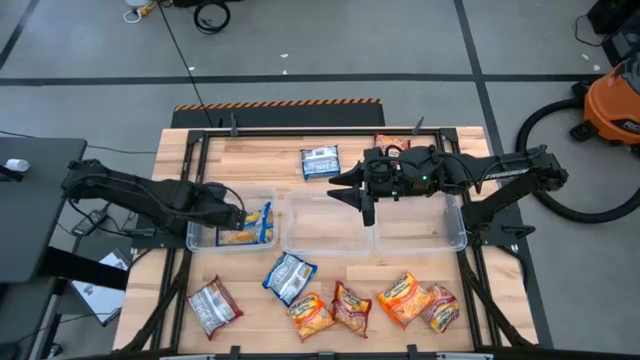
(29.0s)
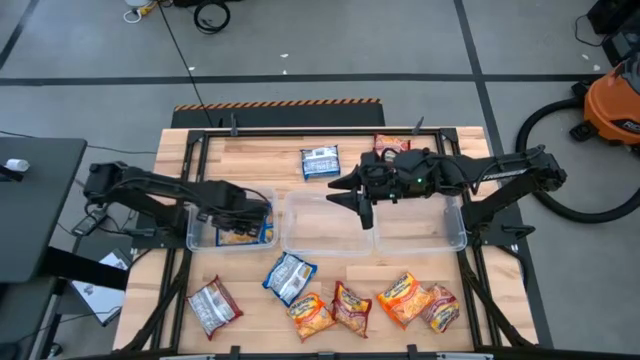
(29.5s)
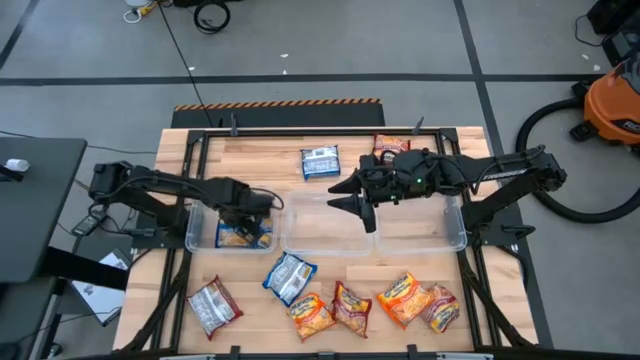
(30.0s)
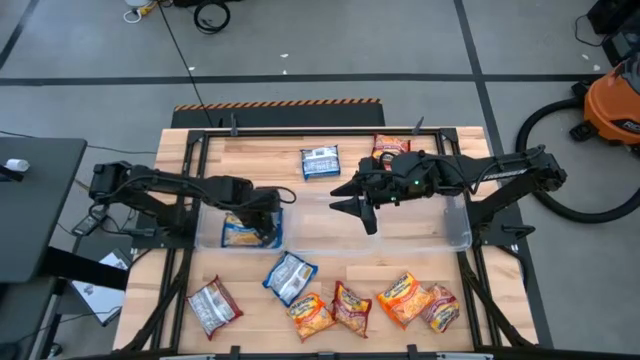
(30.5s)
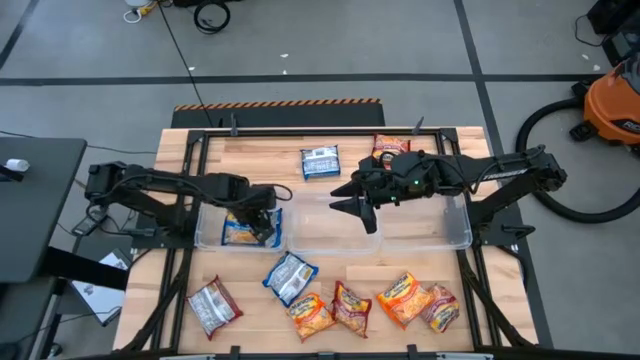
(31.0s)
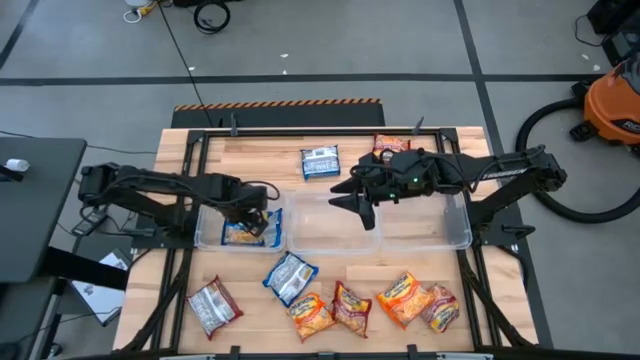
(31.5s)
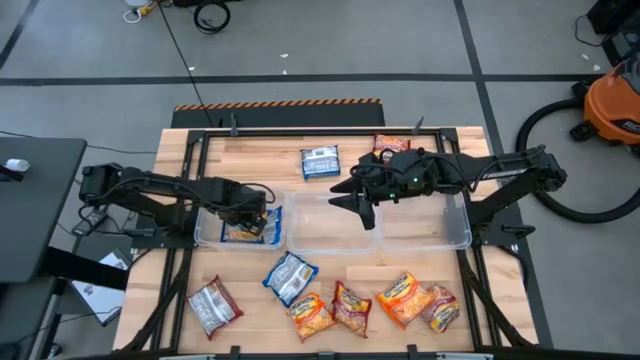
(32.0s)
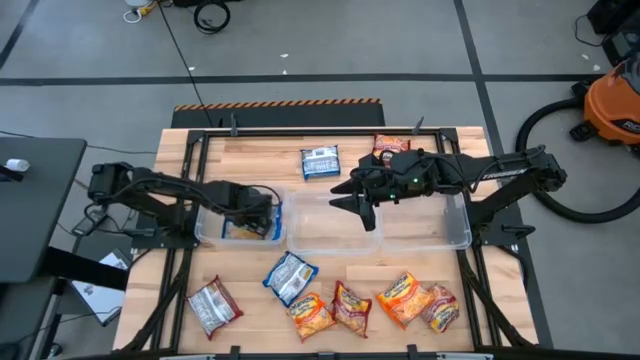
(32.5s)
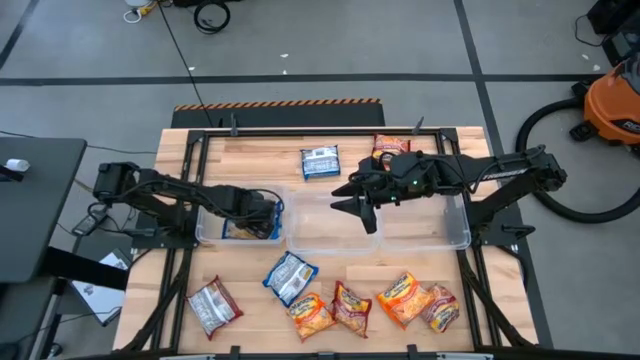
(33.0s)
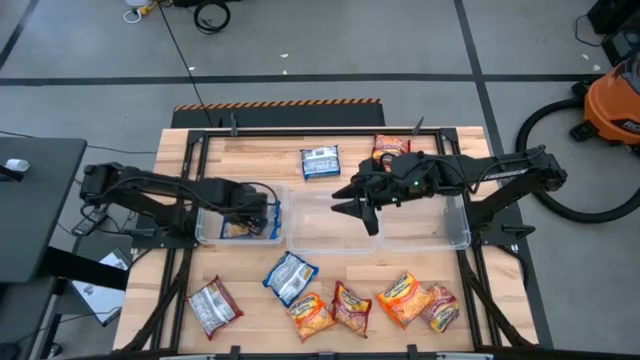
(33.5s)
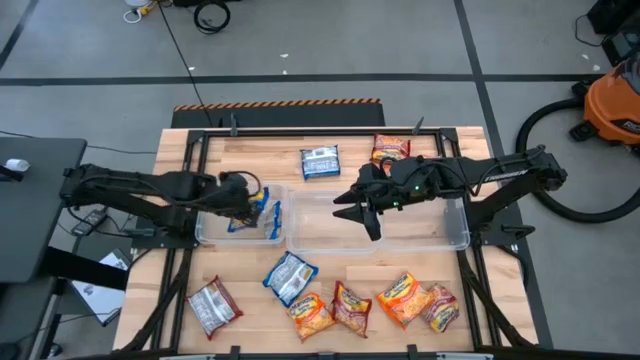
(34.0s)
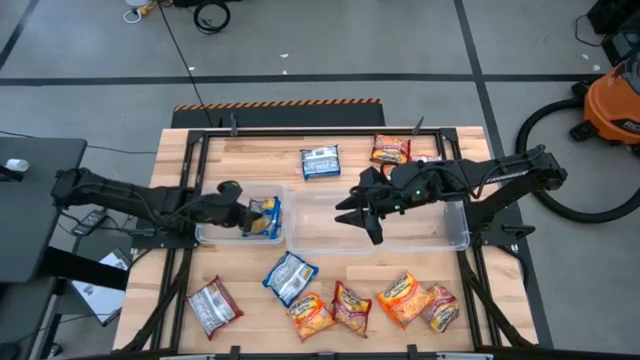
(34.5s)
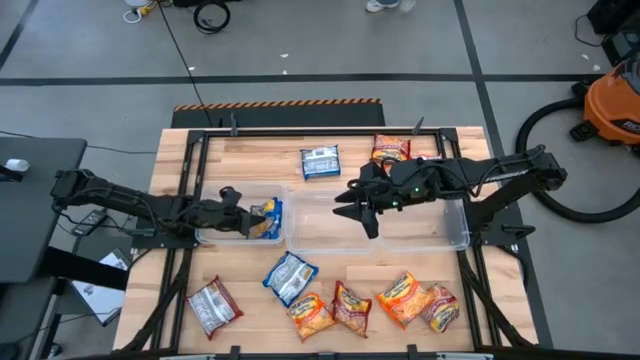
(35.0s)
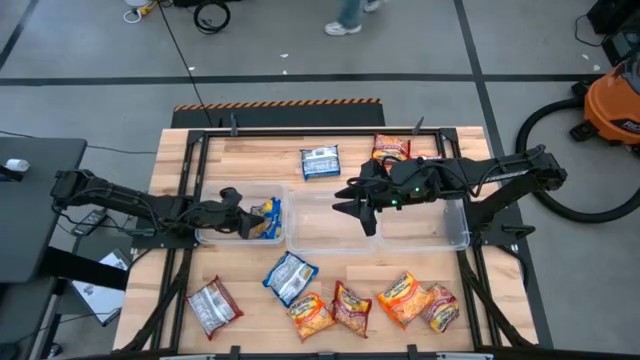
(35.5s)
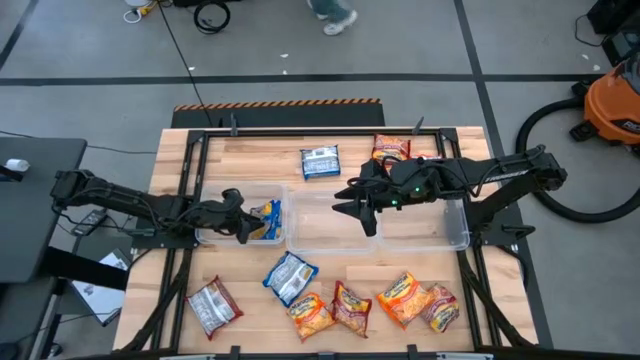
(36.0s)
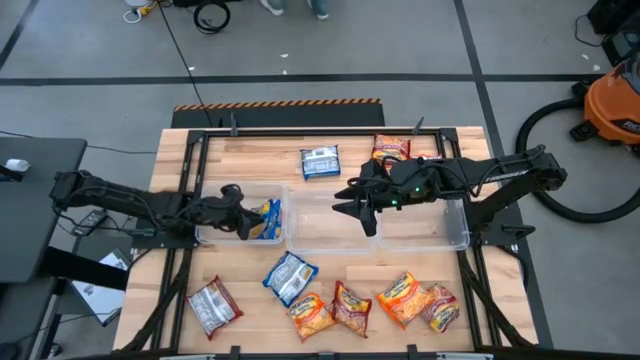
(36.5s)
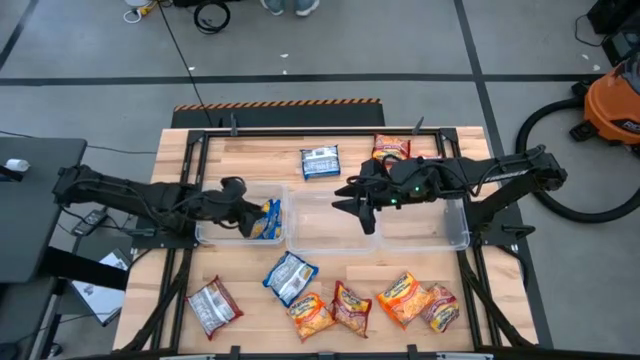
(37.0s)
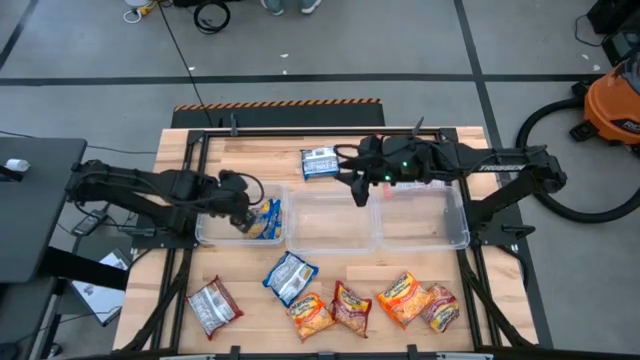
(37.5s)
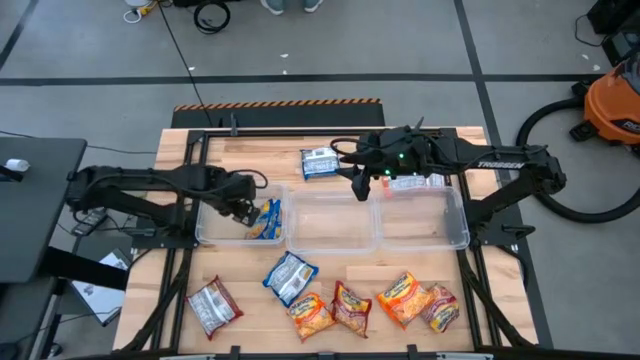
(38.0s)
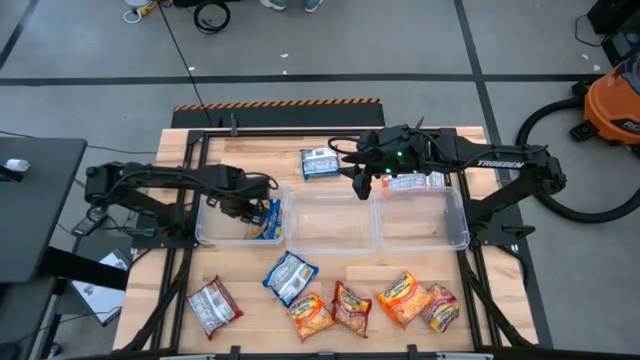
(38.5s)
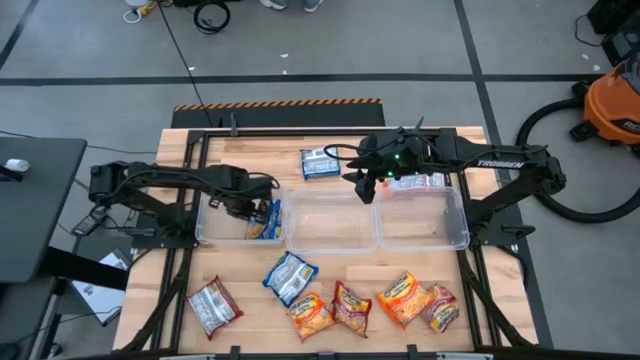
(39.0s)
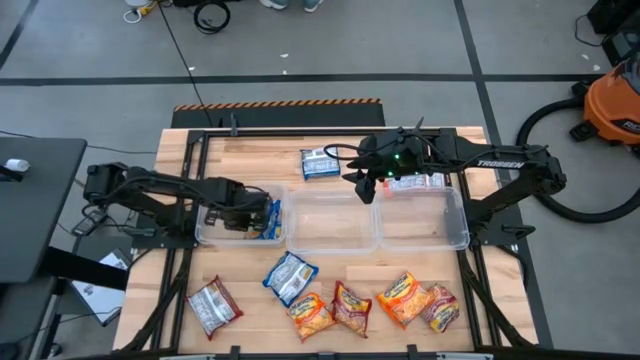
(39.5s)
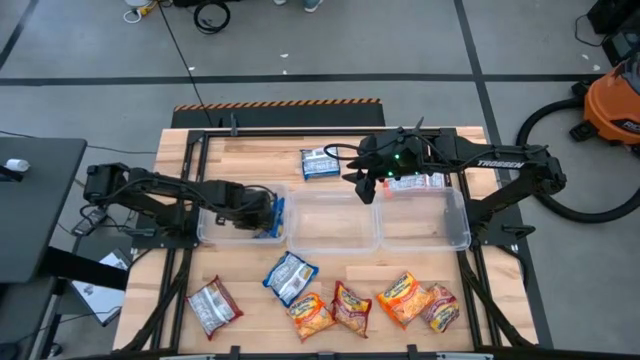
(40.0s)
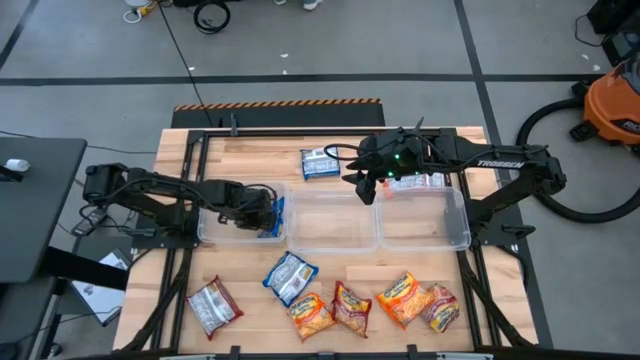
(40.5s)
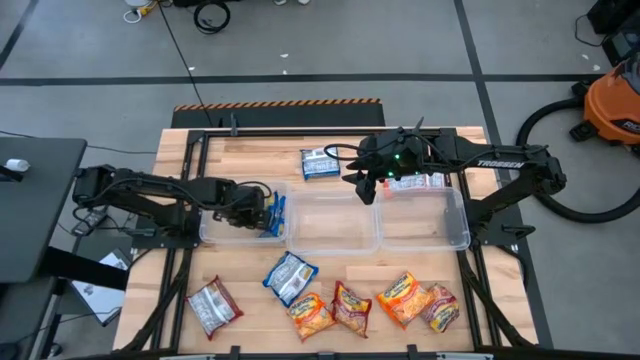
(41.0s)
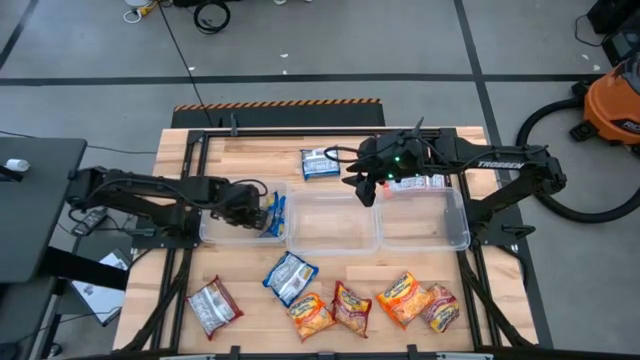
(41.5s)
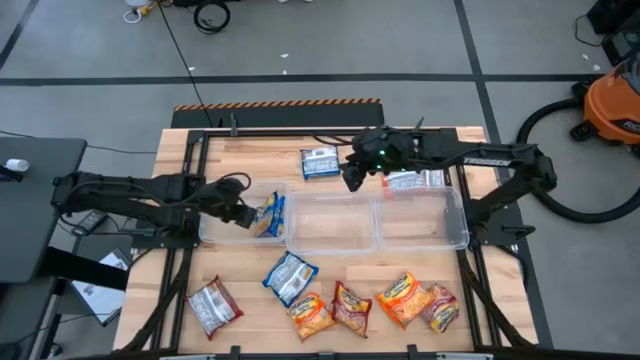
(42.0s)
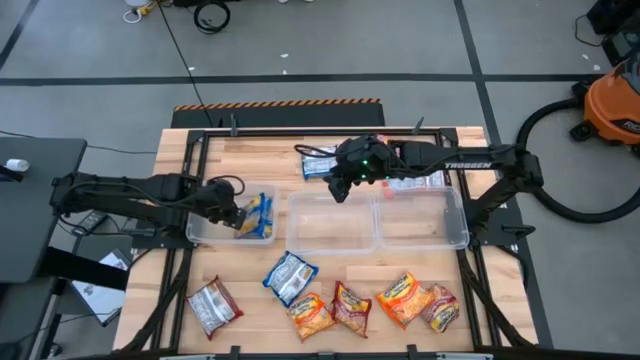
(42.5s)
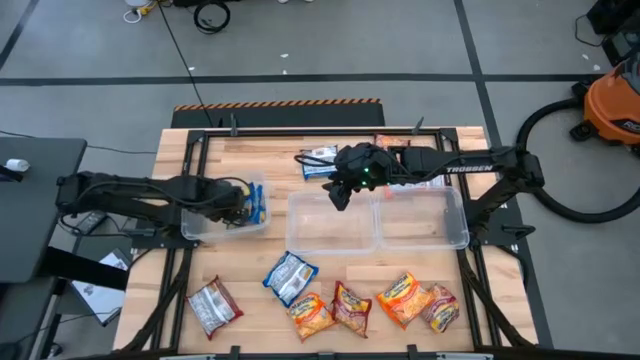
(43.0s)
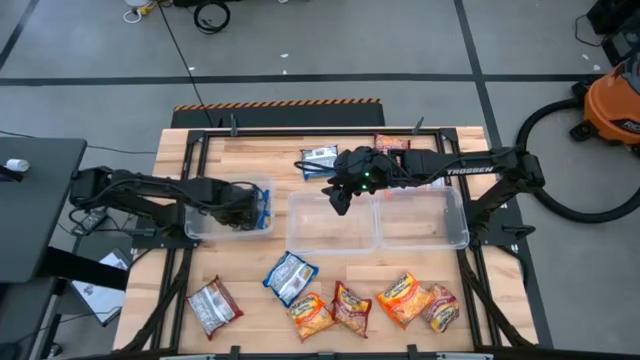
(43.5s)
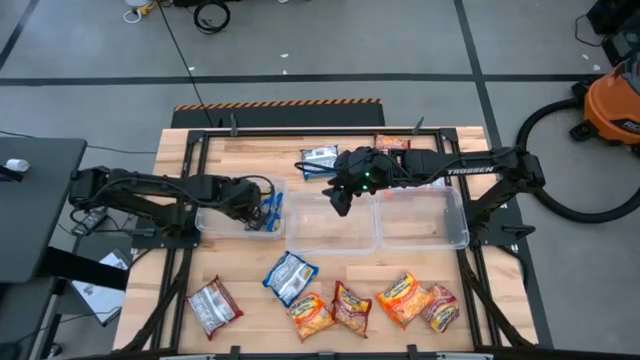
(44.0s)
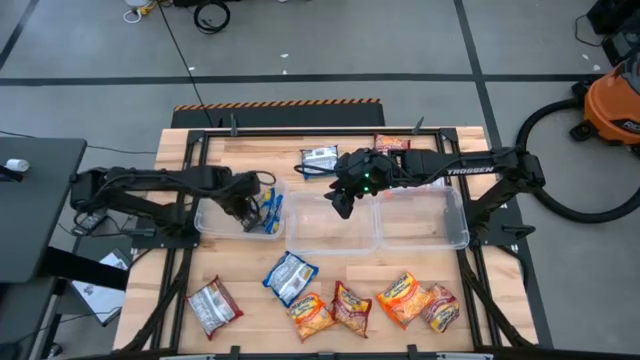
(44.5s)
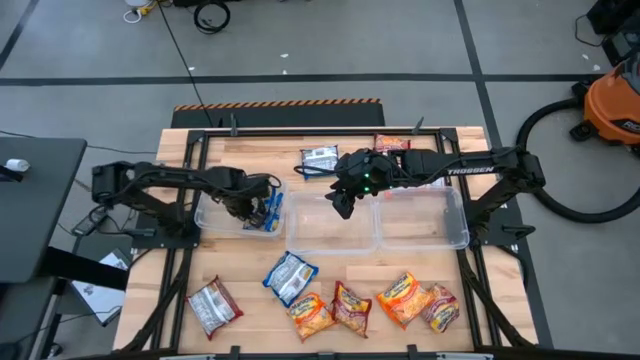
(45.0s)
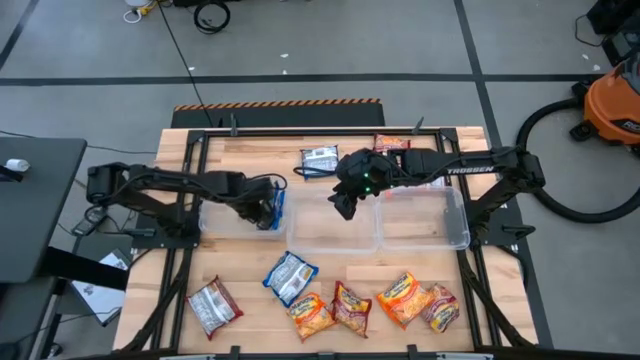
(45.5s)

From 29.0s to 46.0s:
Task: Sort Maruchan noodles
Adjust the blue noodle pack

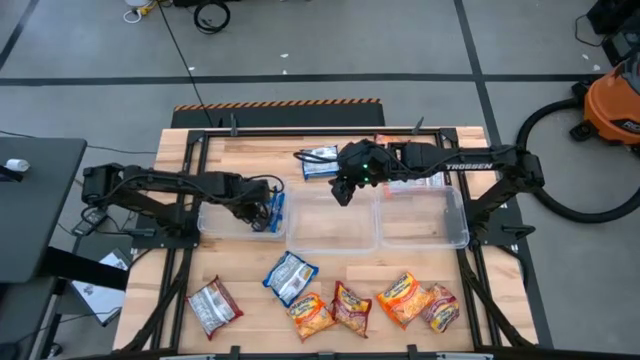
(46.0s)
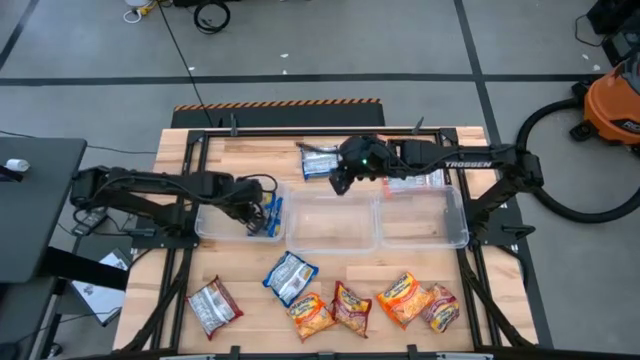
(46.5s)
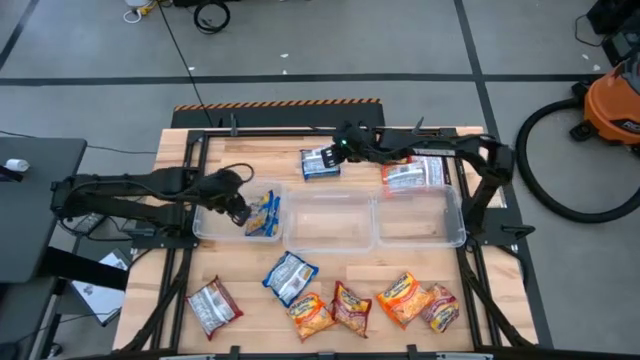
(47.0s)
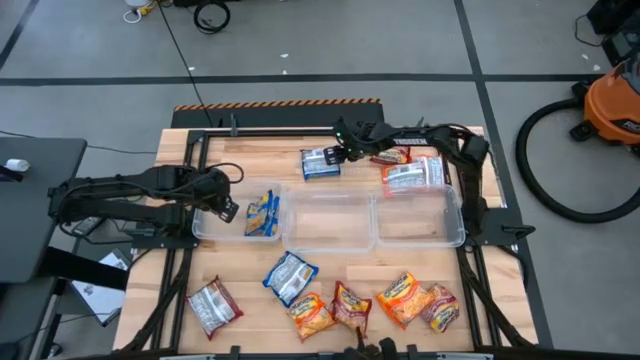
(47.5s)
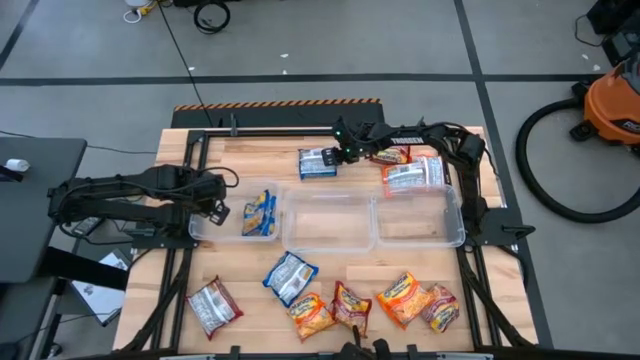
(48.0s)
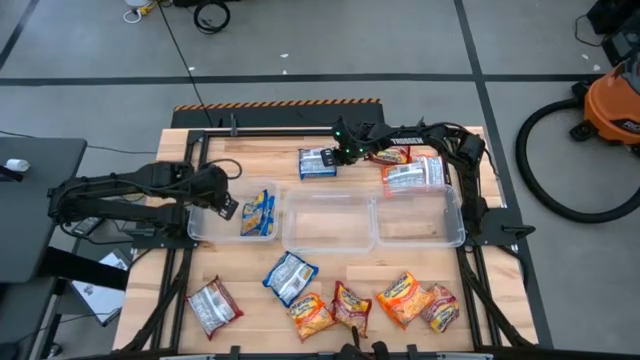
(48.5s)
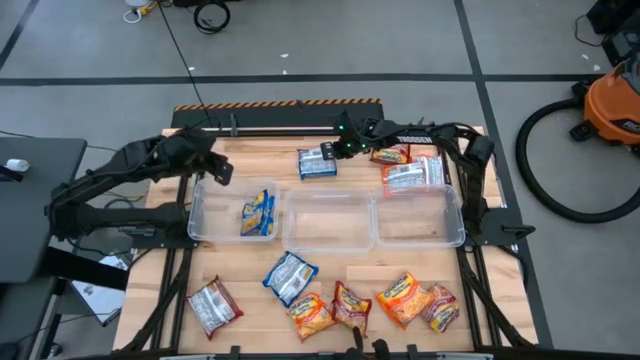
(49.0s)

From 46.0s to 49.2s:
Put the blue noodle pack into the left transparent bin

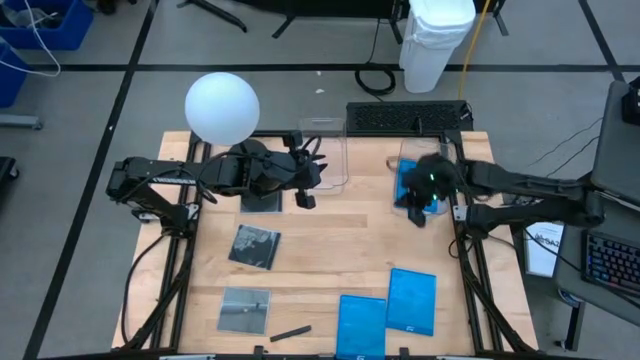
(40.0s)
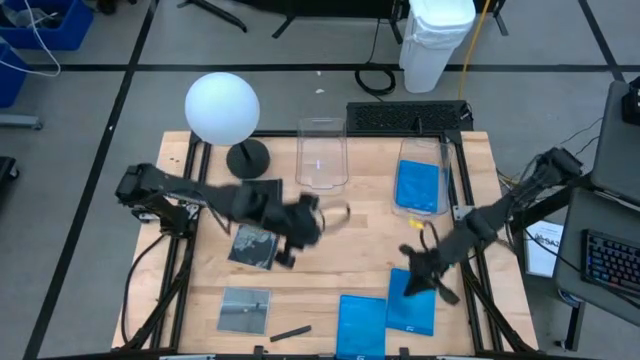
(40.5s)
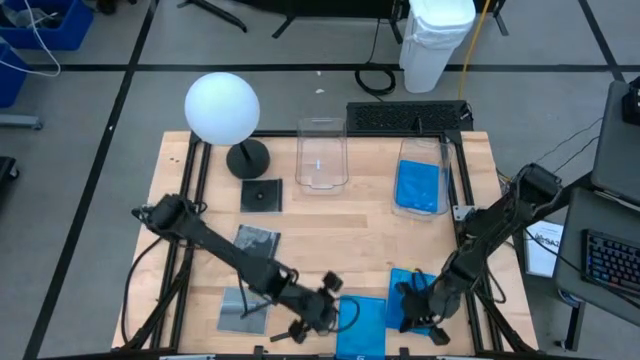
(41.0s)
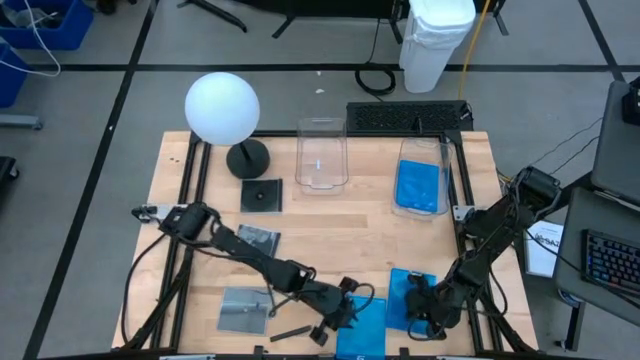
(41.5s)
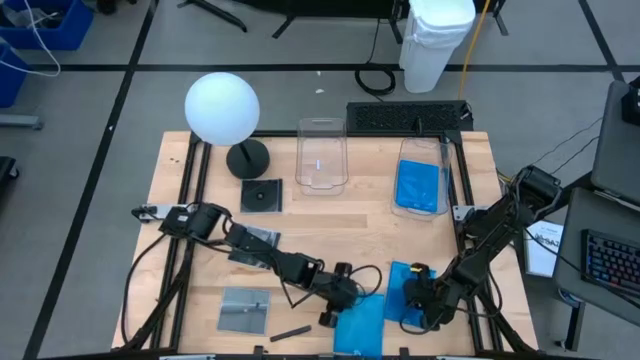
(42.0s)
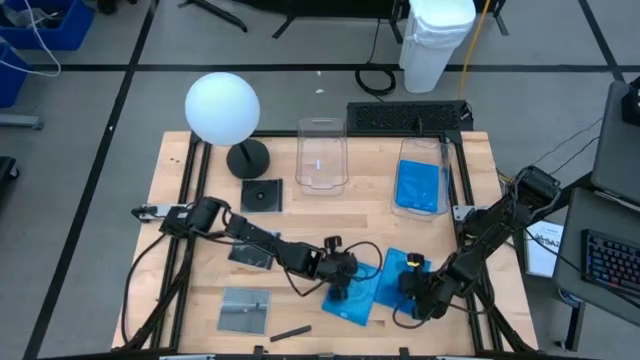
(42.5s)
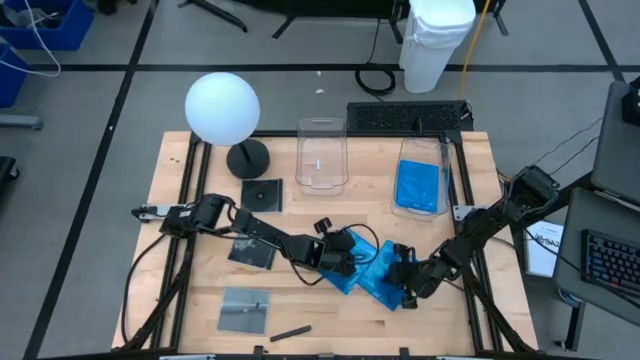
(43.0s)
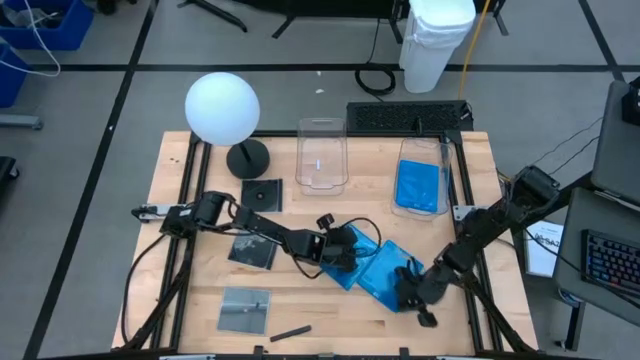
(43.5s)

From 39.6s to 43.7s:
Task: Pick & place jewel cases by type
Adjust the blue CD cases on the table
